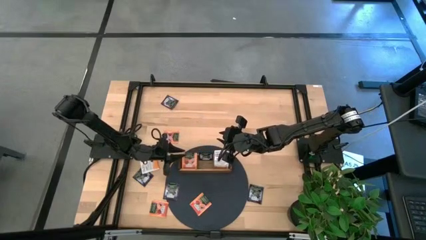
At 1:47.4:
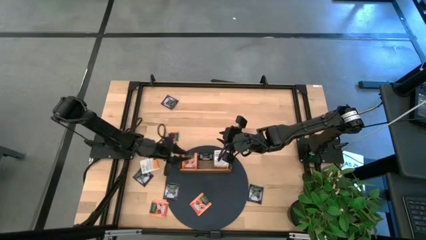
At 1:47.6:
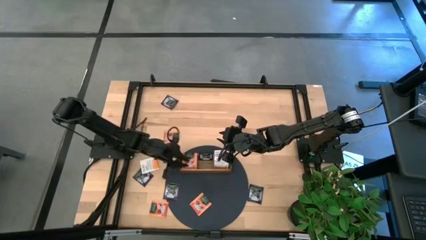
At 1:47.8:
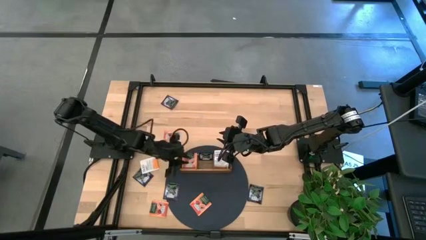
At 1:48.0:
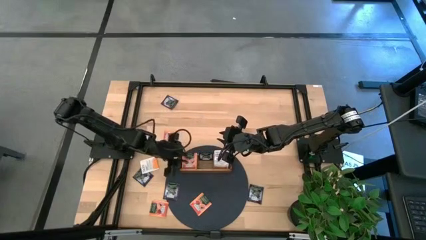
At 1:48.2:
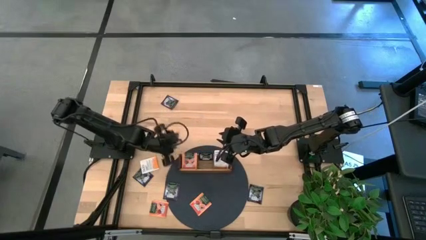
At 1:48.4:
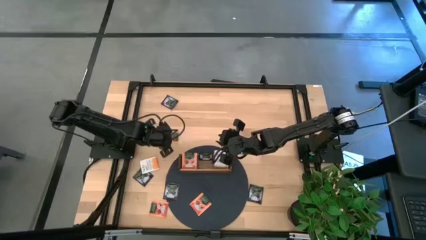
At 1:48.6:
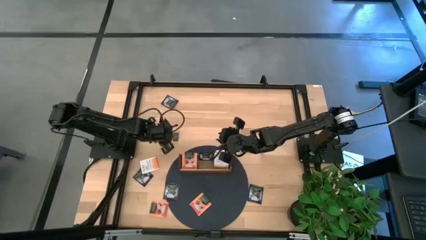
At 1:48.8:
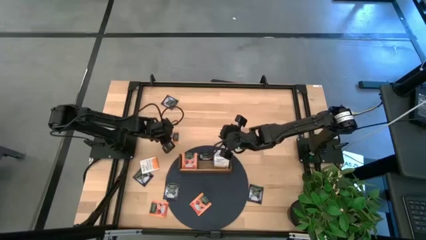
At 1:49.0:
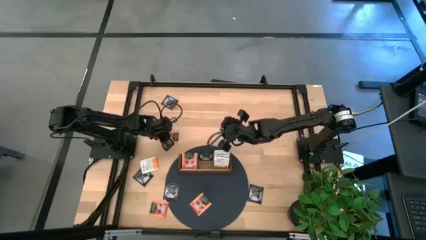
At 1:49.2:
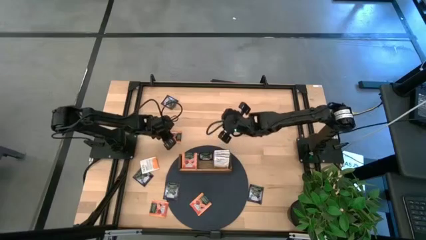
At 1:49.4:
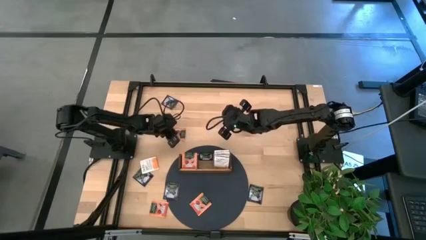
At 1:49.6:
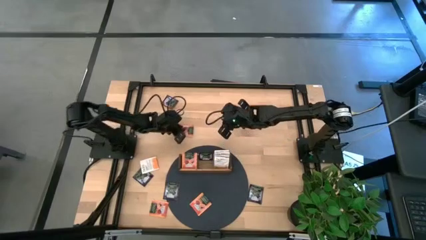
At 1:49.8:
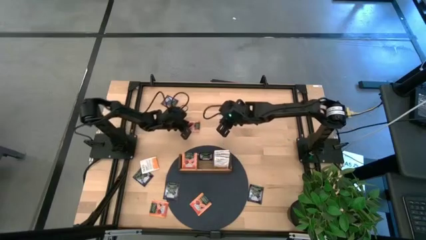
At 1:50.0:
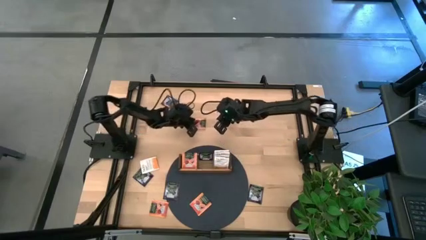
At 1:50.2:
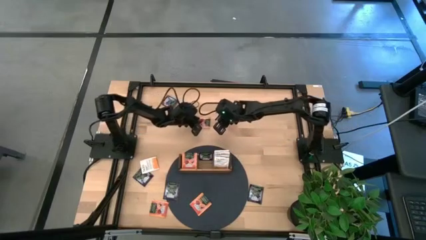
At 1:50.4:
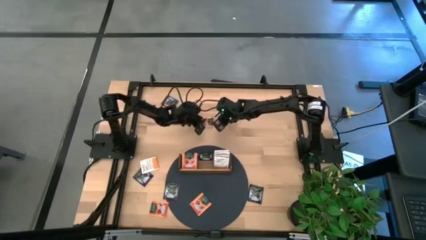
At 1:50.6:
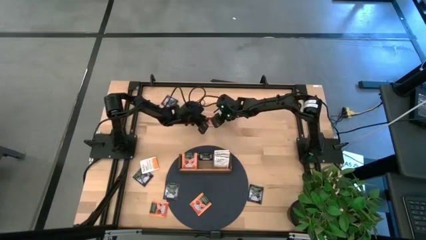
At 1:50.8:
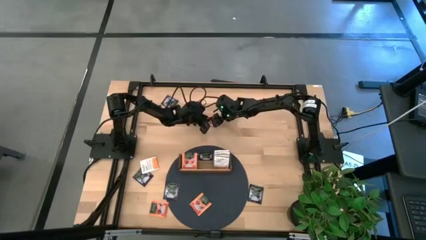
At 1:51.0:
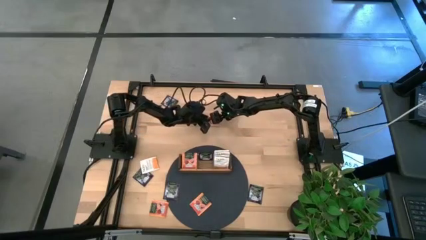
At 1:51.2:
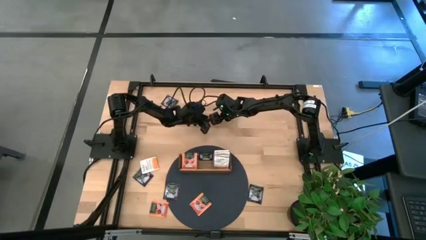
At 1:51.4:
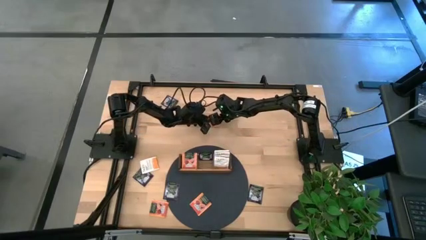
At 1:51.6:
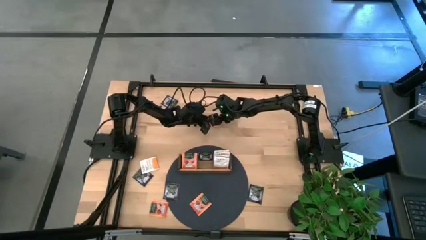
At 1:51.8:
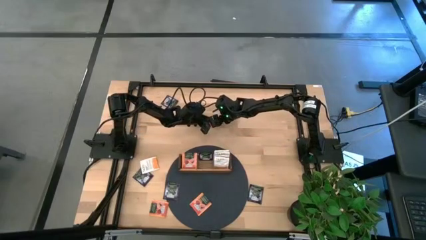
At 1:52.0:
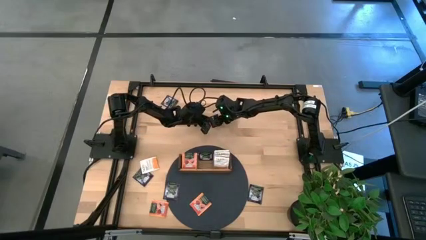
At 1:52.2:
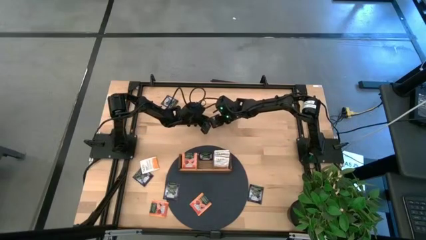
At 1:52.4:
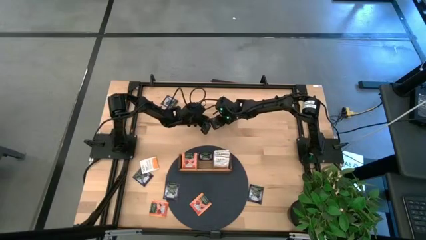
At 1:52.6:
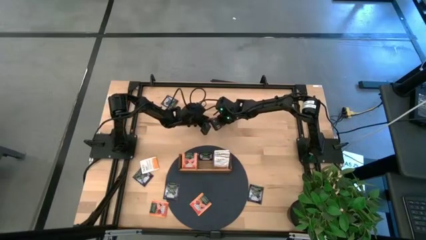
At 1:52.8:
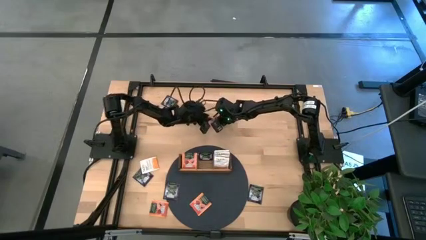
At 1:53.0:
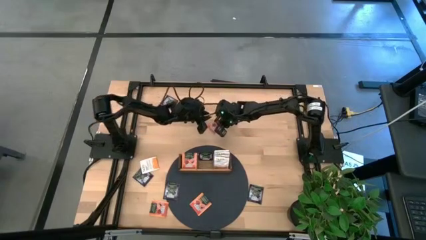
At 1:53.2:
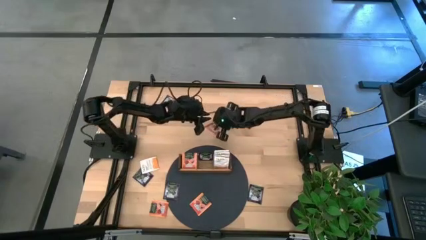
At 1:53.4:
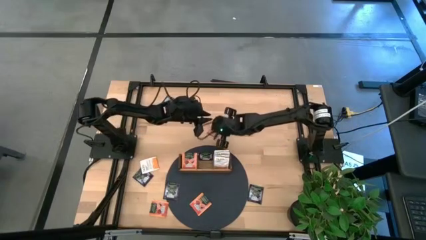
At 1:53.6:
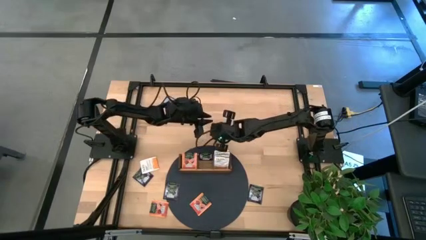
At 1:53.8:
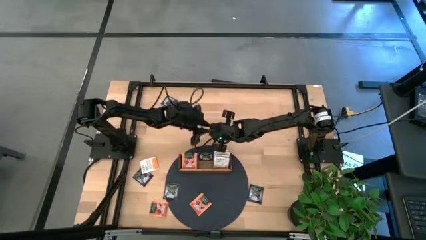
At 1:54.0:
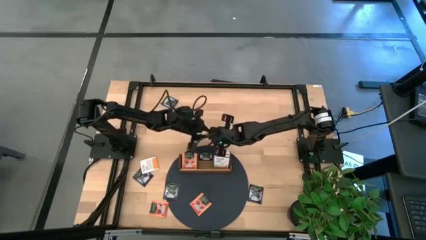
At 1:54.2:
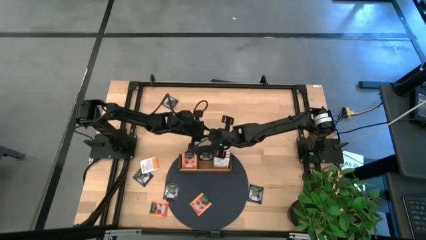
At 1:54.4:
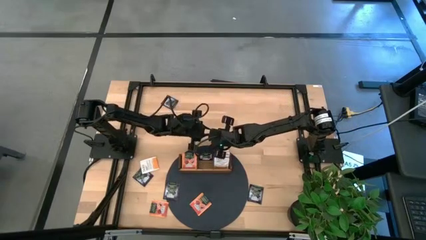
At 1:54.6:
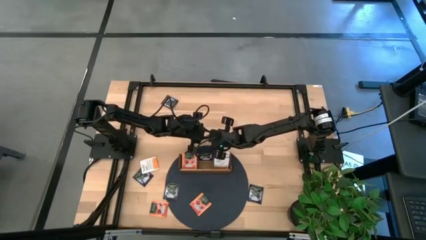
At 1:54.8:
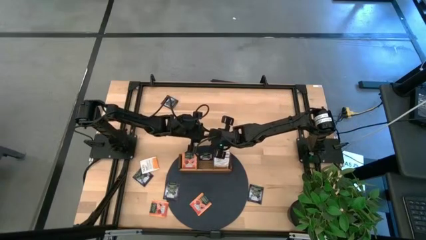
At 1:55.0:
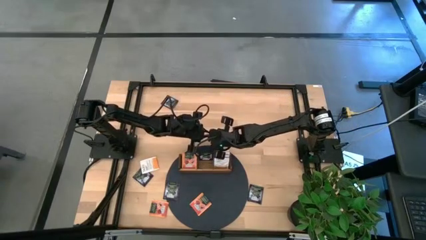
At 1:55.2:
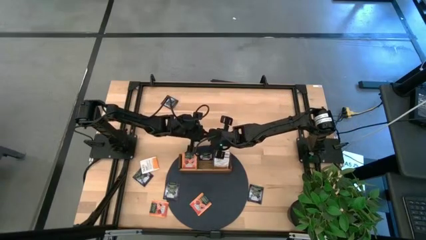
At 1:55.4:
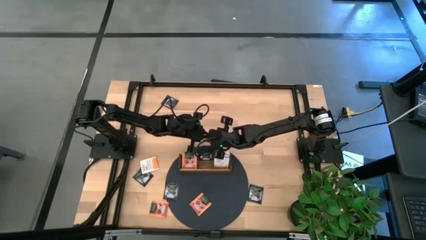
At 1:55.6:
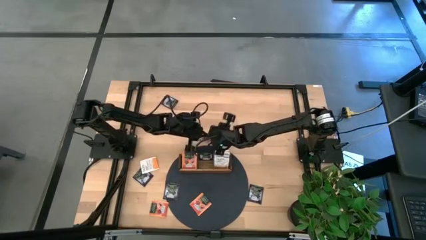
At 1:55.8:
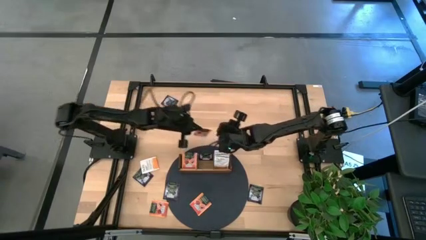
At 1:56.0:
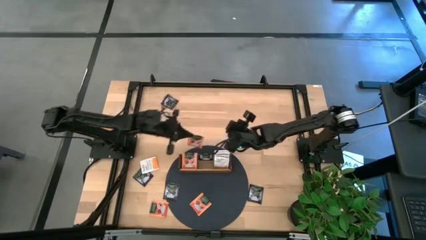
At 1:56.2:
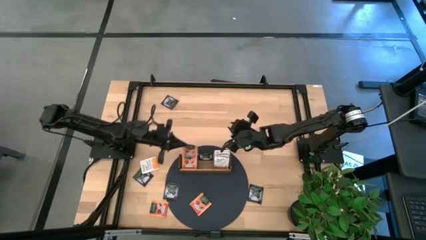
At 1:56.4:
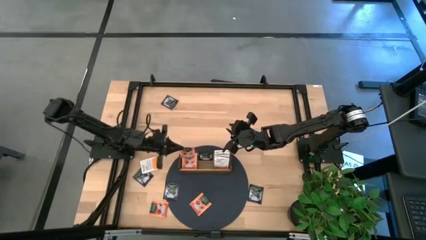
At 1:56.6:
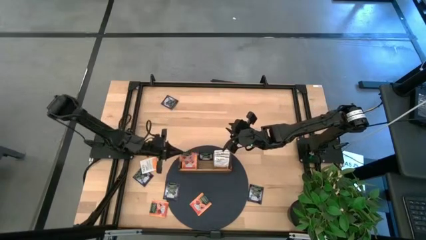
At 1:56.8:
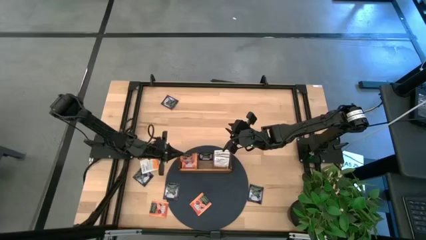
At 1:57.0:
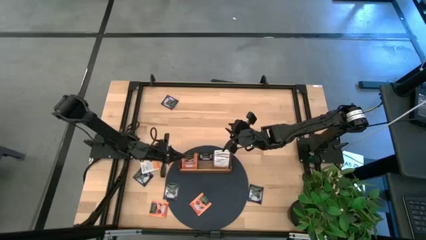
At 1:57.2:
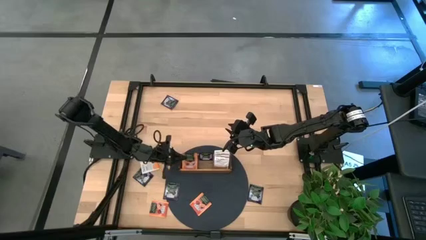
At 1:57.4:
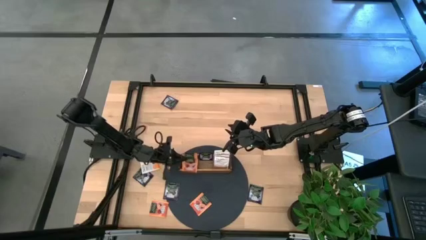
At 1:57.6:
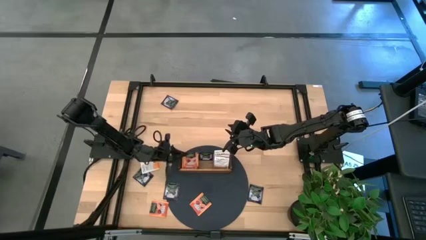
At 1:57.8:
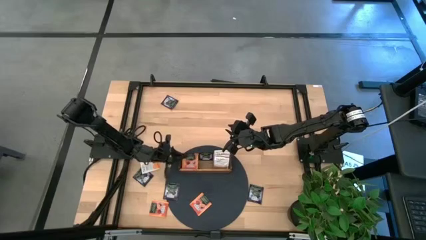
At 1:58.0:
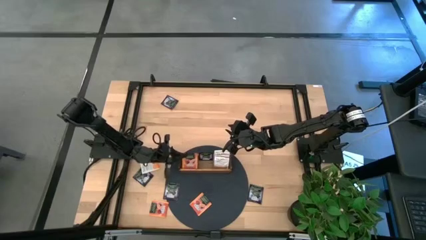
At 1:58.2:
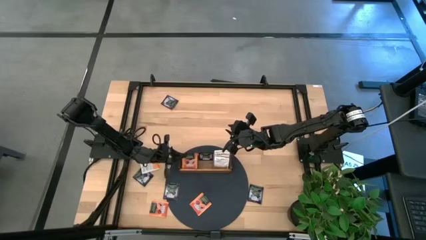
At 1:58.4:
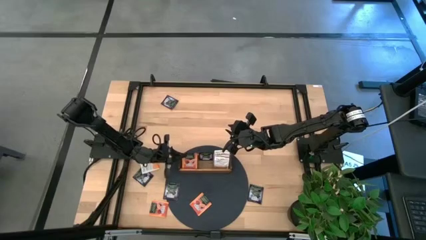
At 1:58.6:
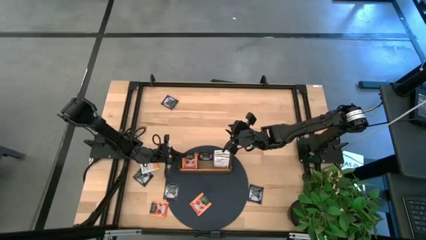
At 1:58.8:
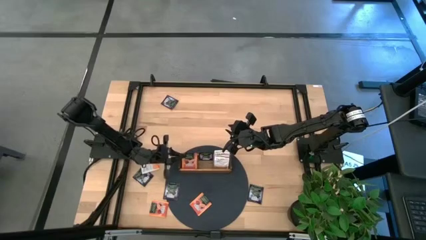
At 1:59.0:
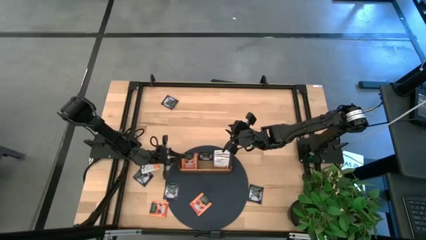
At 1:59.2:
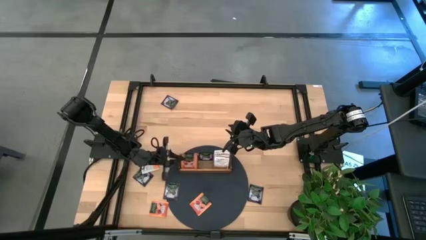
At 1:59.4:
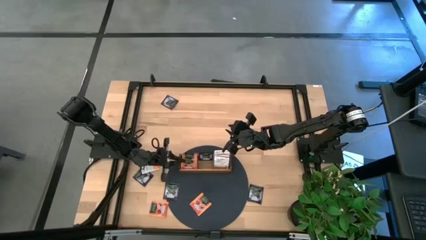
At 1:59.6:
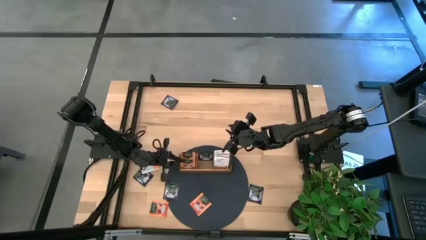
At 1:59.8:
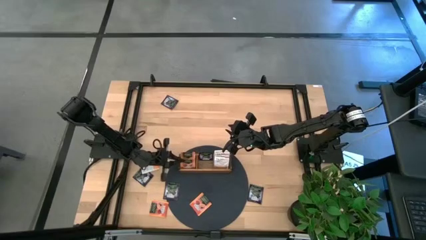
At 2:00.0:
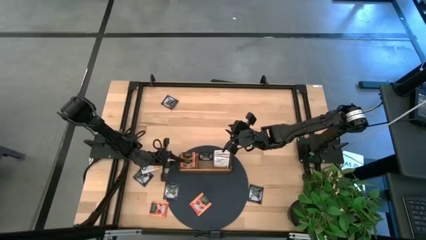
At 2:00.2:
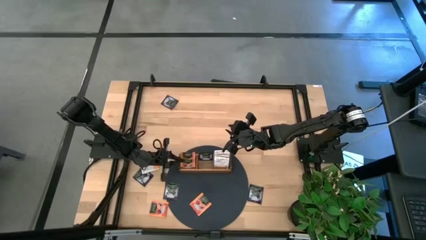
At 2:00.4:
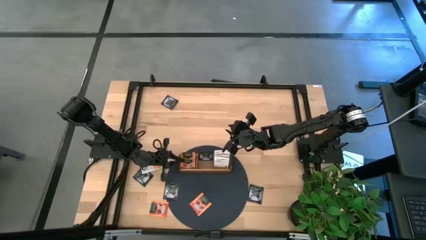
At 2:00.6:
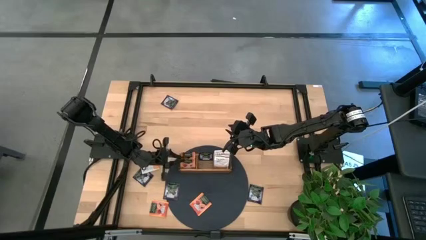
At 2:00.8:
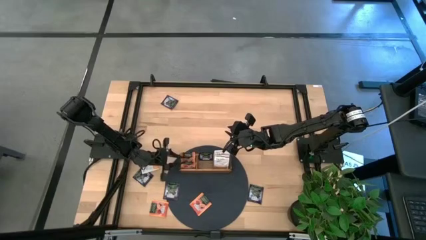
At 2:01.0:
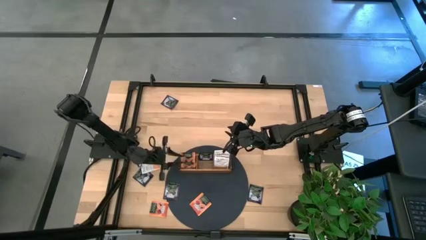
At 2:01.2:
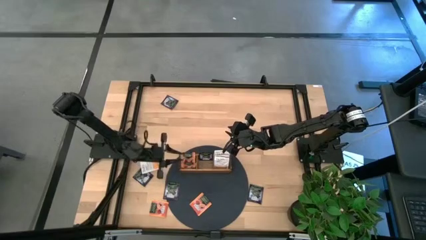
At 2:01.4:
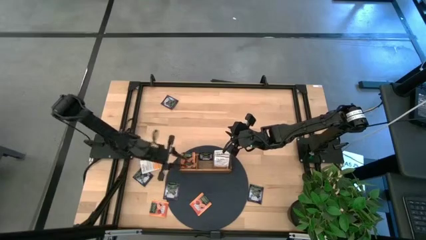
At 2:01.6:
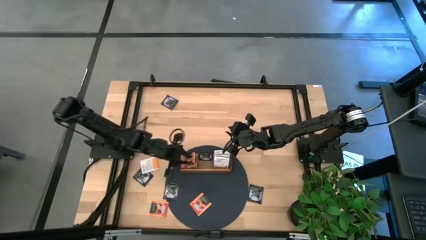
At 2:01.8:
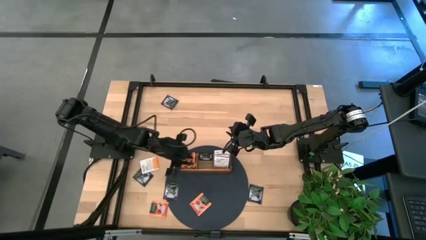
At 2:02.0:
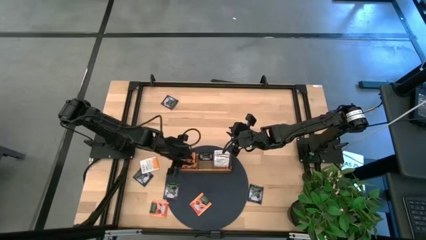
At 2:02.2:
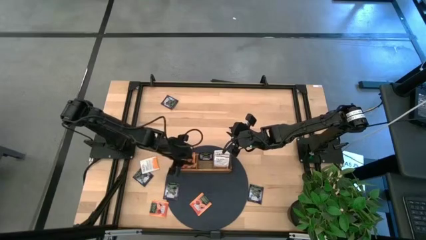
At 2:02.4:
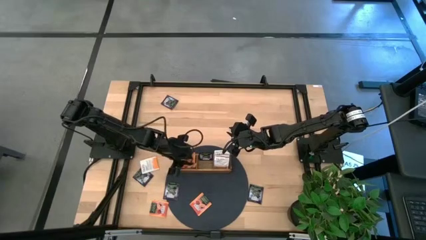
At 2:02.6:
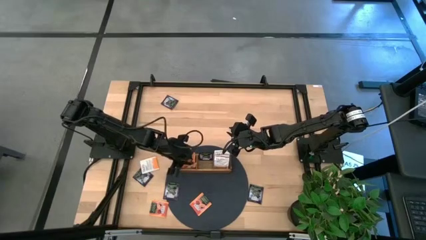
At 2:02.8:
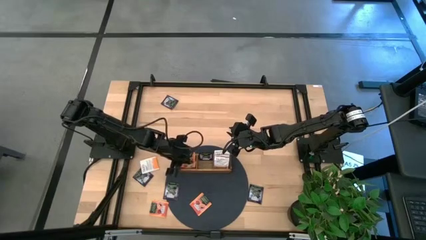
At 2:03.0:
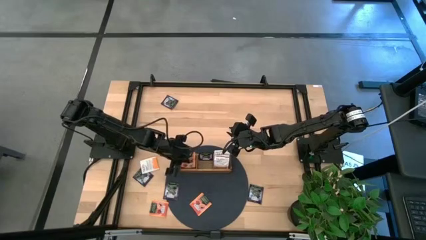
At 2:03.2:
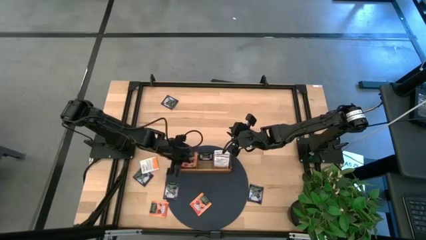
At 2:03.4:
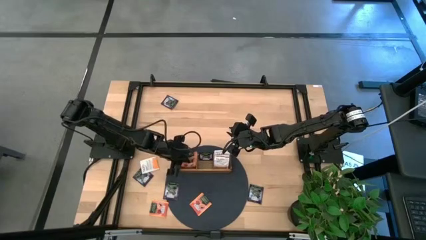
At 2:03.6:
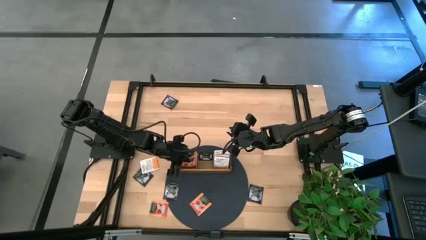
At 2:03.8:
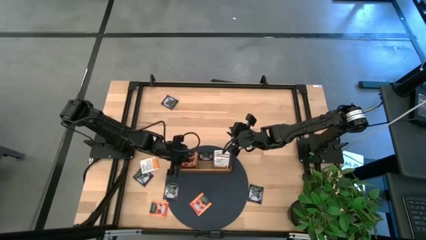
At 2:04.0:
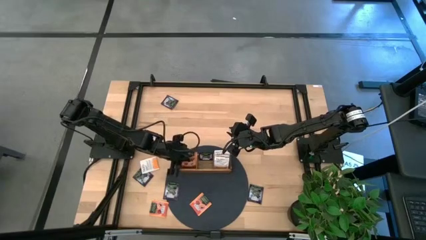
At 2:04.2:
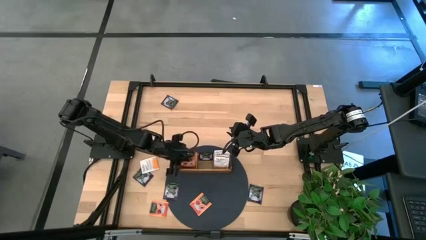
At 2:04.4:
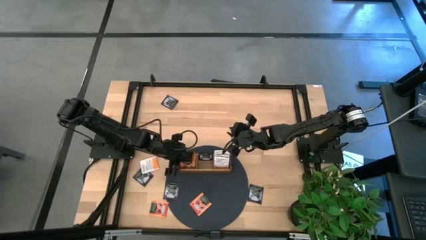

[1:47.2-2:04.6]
Task: Pick & Place Tea
Put the orange tea bag into the left section of the wooden organizer
